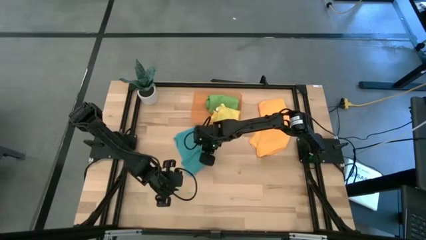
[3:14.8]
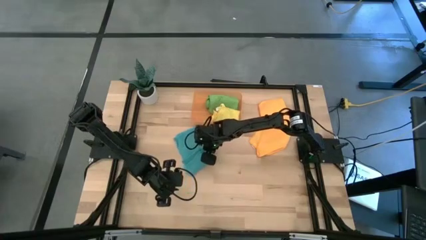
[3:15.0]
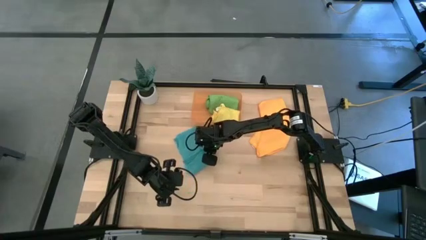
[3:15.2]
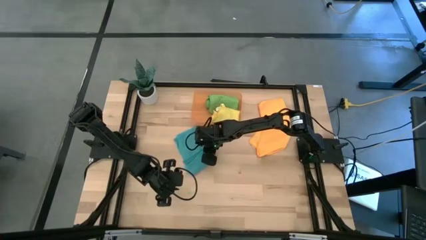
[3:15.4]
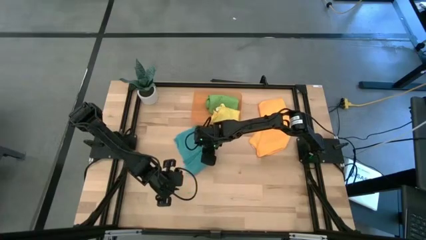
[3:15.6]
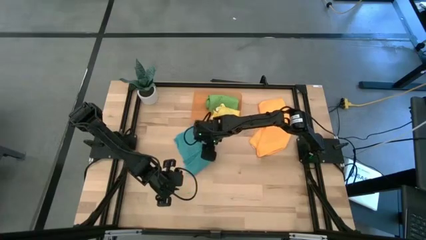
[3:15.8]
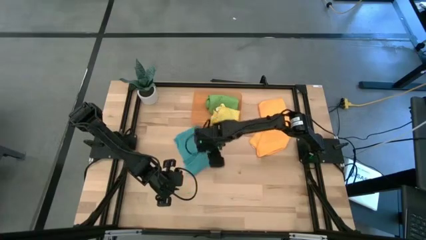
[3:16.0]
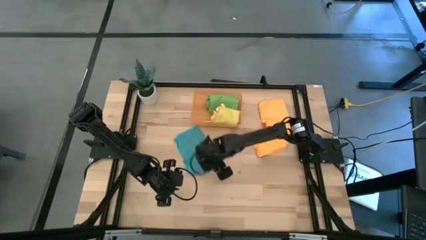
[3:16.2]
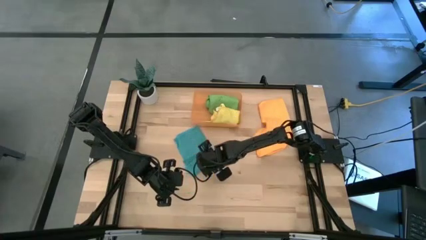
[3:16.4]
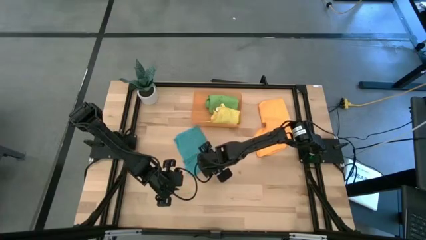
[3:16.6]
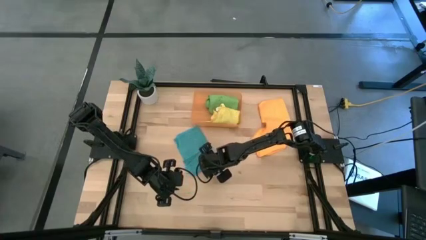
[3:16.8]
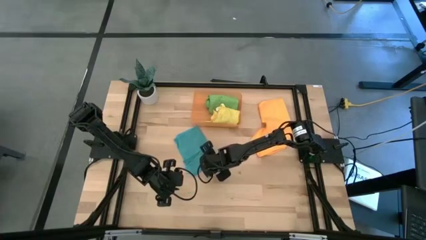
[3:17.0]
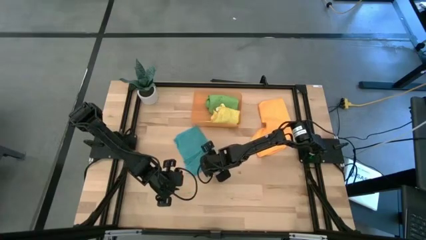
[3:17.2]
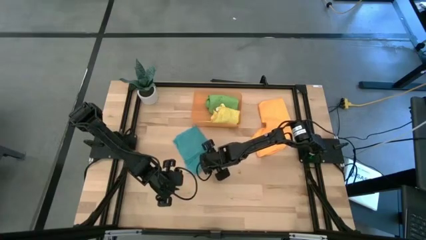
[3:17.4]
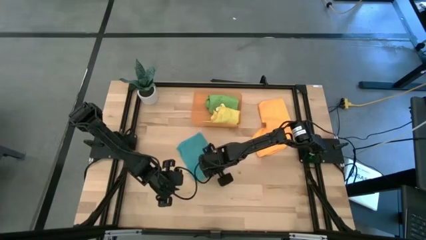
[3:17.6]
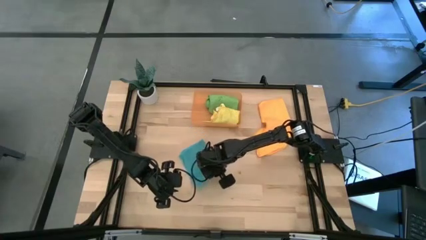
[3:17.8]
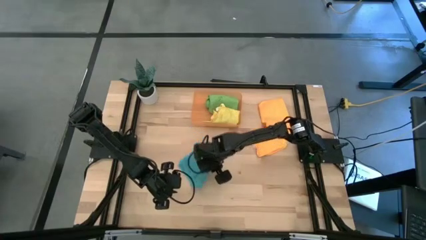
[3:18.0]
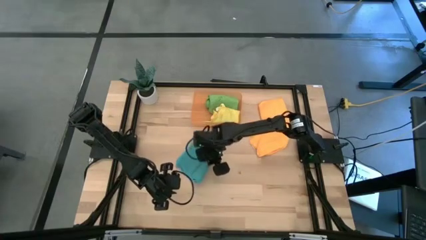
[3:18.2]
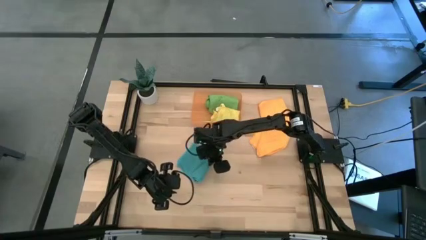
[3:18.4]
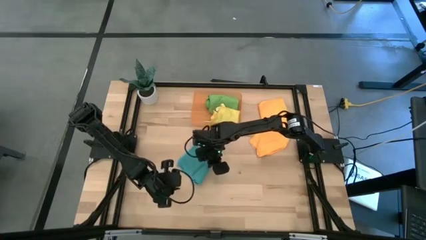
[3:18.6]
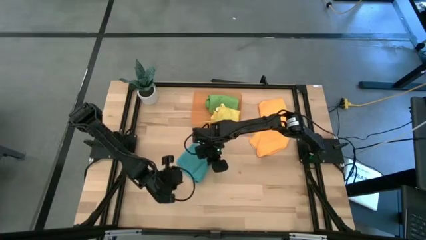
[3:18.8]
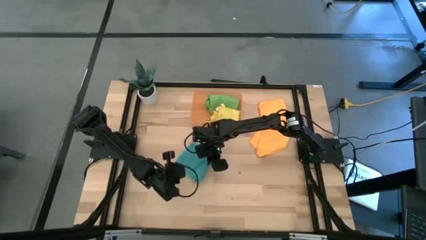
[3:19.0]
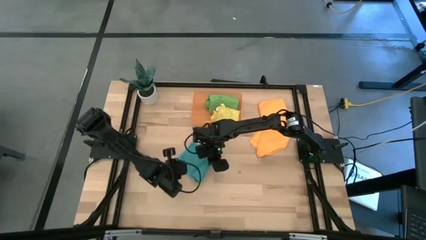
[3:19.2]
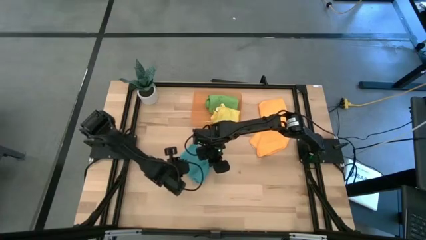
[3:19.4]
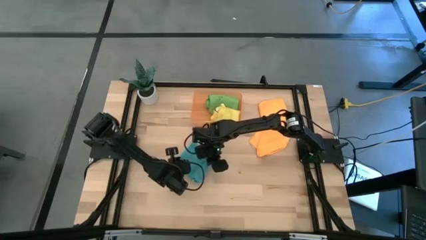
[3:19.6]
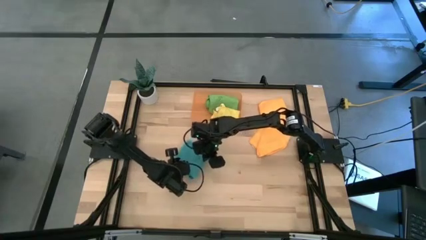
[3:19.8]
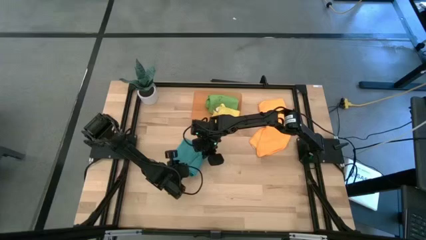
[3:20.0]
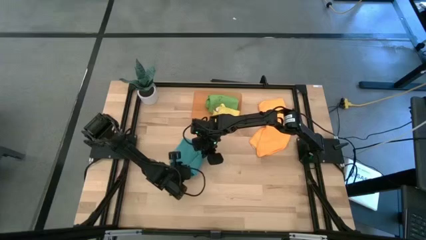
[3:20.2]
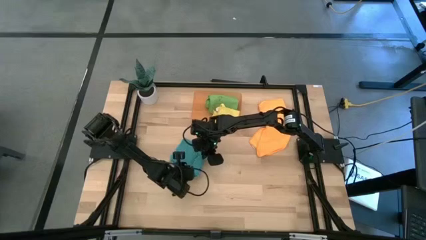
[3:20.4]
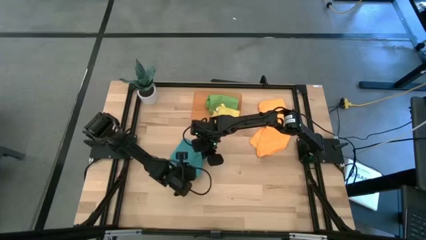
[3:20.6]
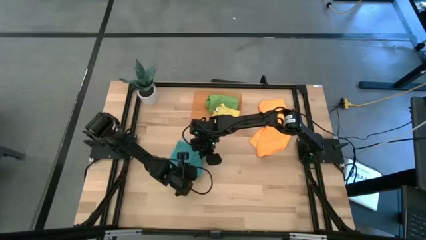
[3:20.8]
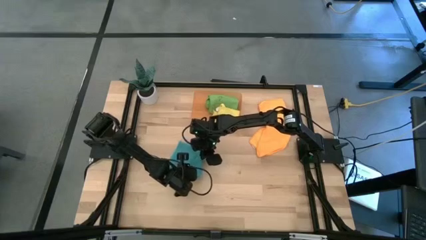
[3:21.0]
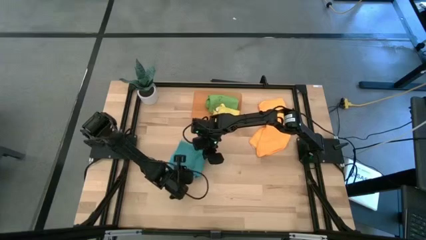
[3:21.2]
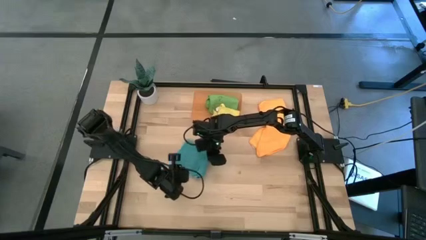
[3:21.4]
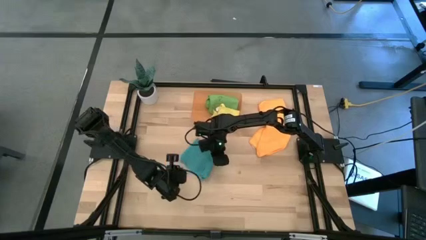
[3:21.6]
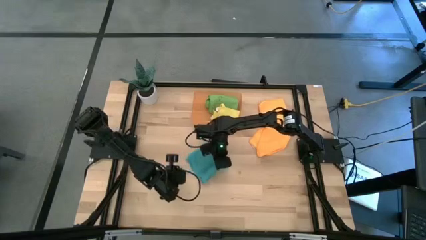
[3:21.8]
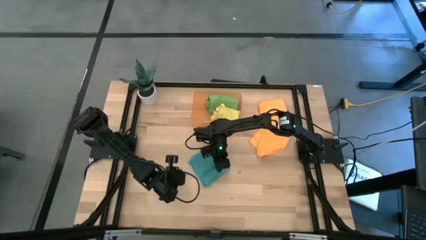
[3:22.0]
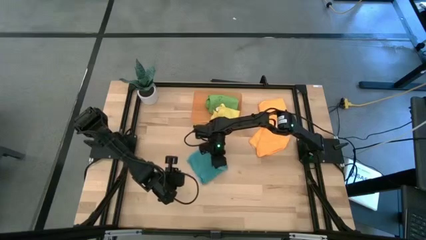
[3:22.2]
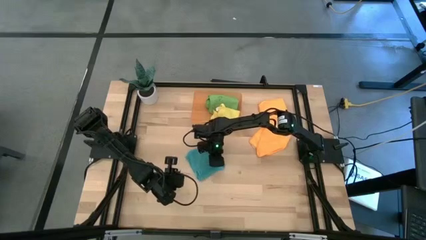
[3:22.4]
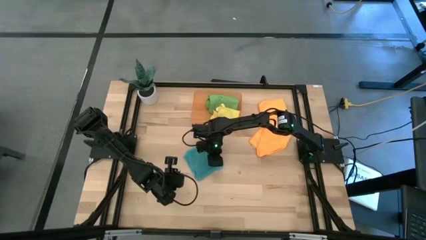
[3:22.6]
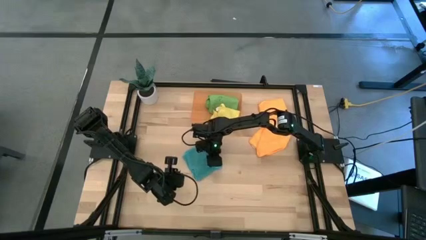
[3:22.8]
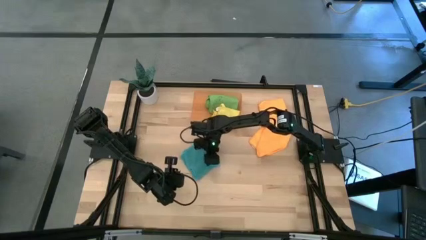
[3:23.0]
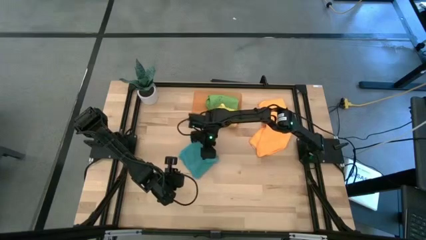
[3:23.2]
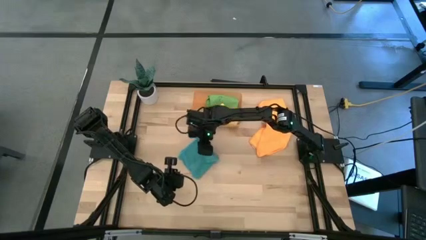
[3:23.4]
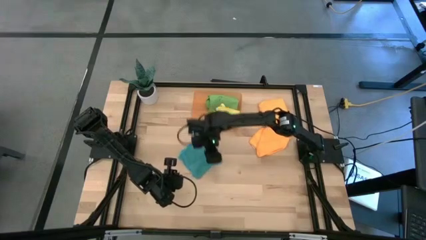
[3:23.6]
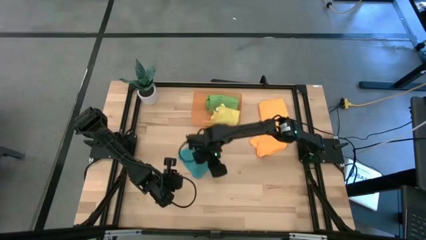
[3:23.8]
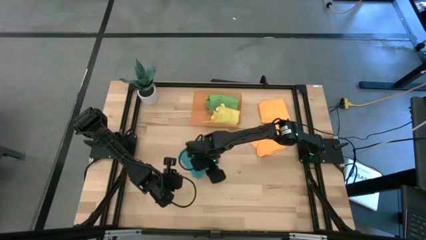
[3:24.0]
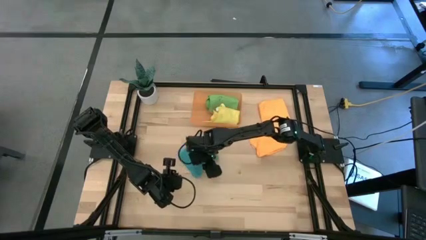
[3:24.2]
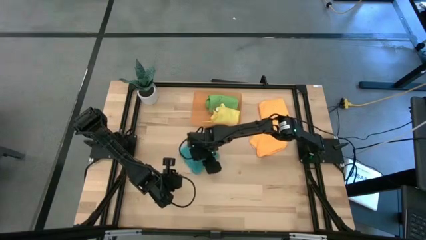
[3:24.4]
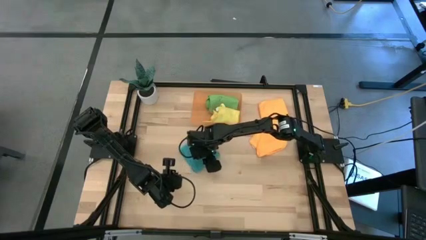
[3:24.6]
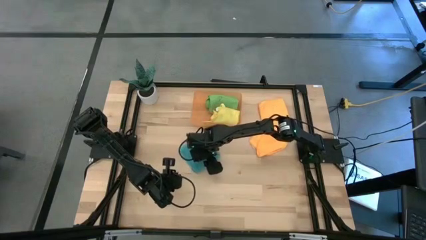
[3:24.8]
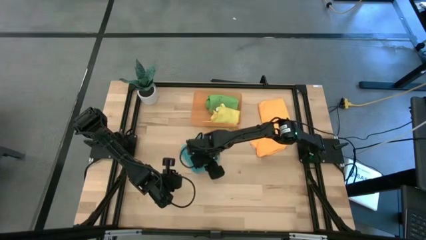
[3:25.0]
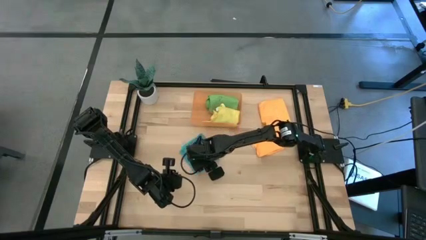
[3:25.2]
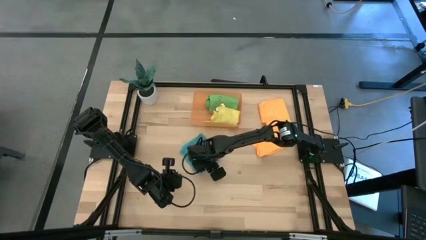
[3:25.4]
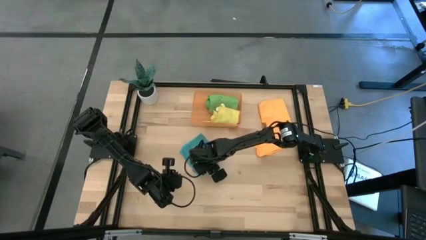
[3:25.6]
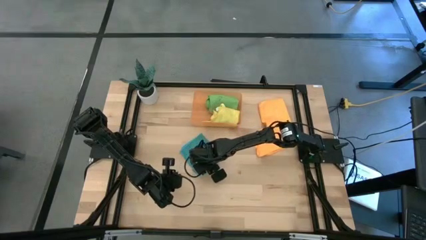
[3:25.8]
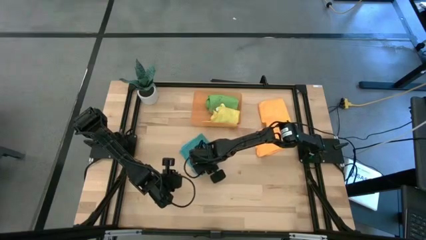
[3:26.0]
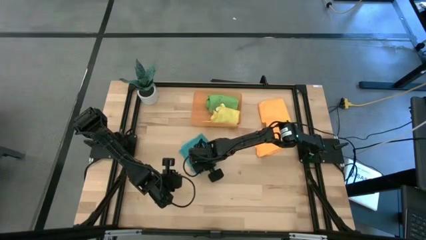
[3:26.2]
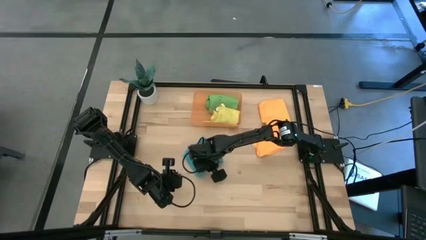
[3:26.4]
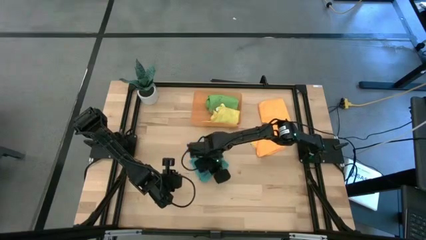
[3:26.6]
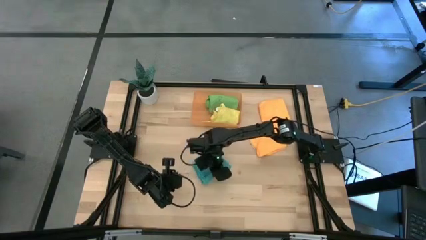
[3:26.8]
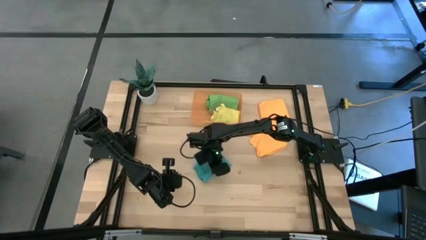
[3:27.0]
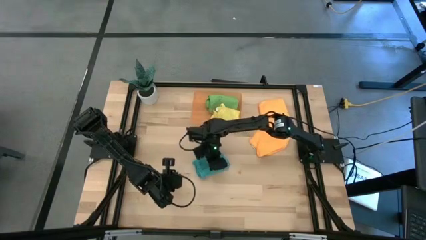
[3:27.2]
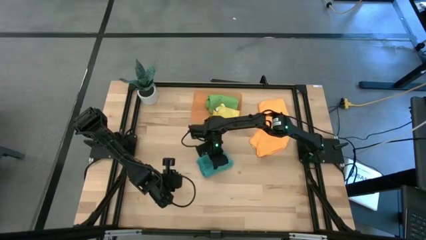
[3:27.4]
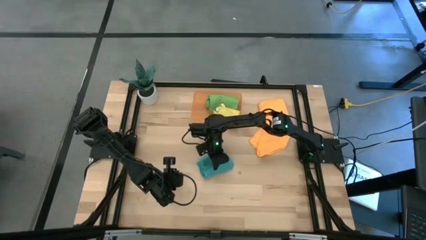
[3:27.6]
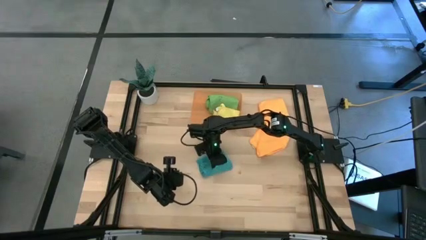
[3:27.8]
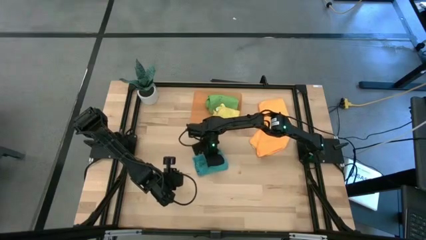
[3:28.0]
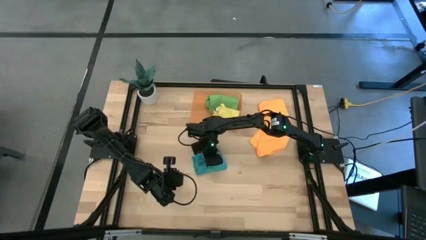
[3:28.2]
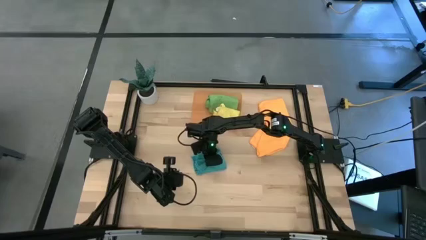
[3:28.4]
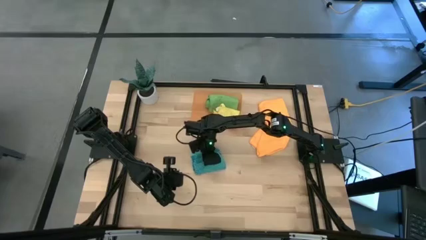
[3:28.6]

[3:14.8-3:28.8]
Task: Roll microfiber towels into tight, uniform cylinder then place into a basket
Roll the blue microfiber cloth
